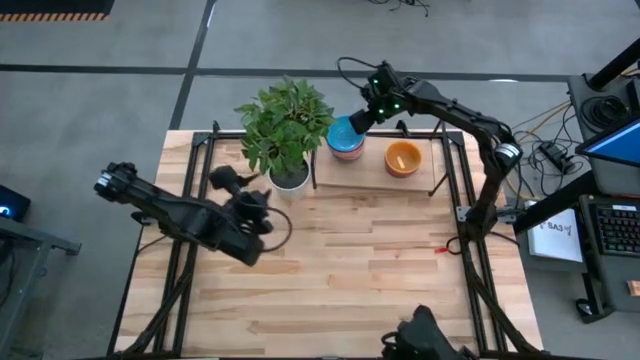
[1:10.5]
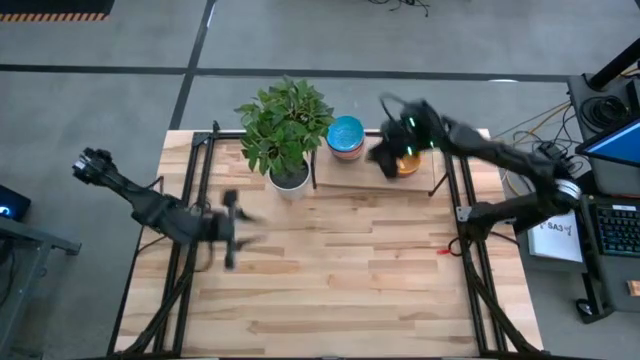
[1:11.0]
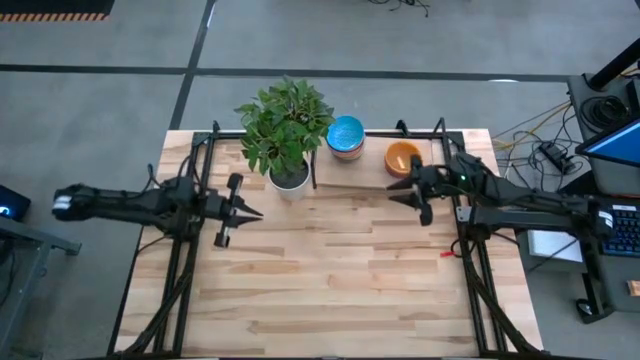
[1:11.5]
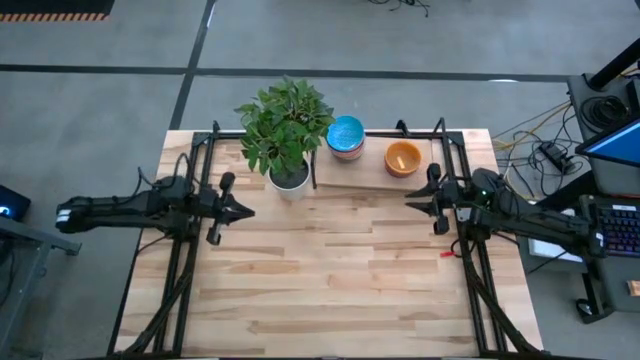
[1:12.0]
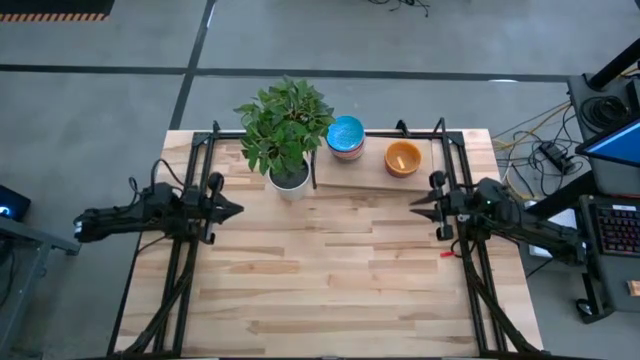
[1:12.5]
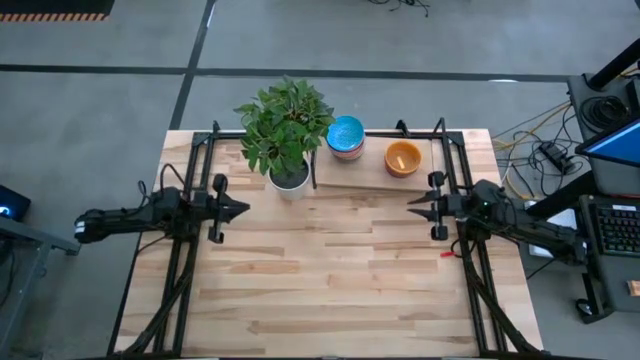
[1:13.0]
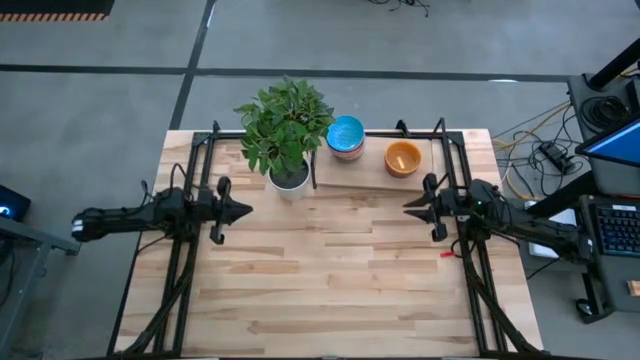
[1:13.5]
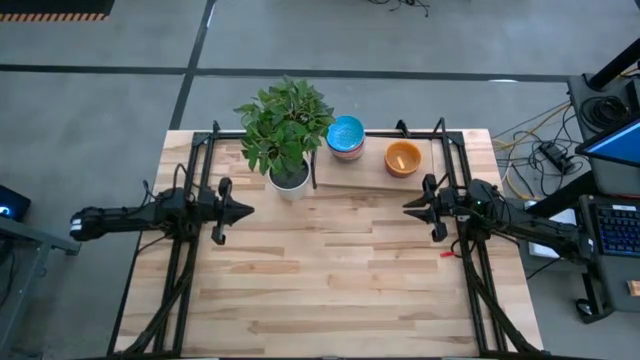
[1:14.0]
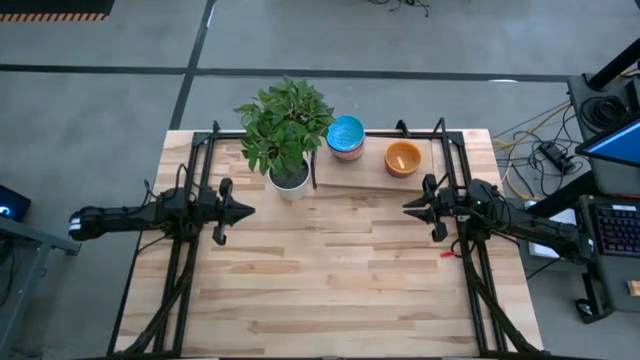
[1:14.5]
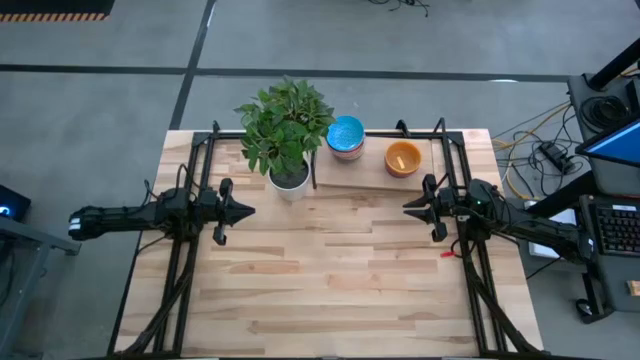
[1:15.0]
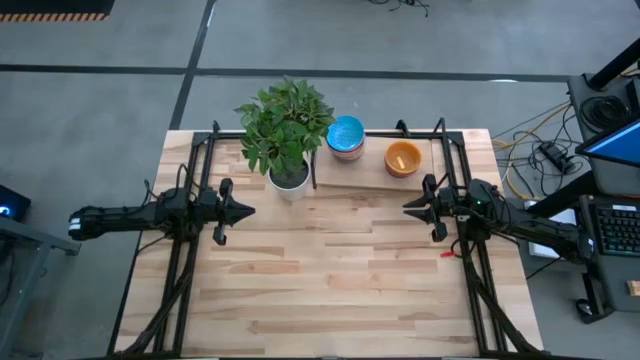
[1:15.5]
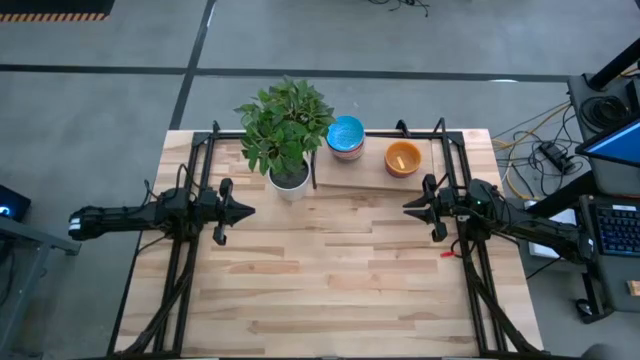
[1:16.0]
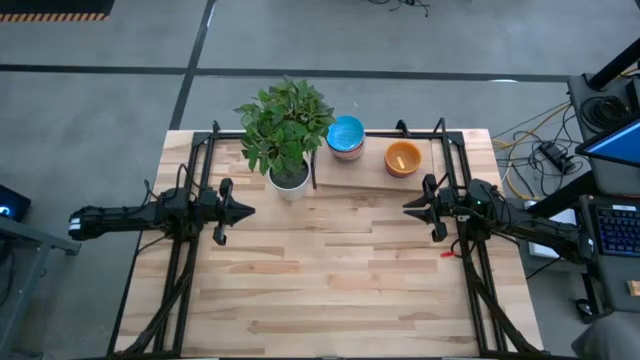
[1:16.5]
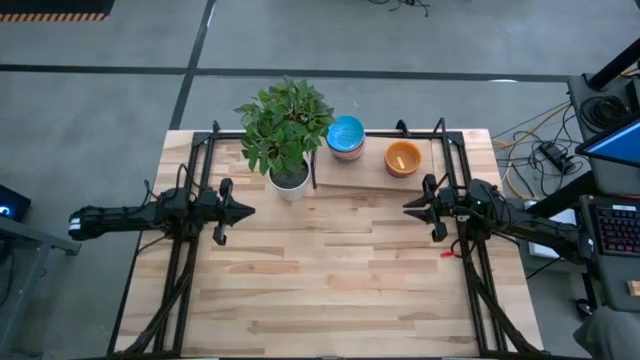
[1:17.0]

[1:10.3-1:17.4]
Task: Place and stack bowls onto a shelf
Return to Home Position

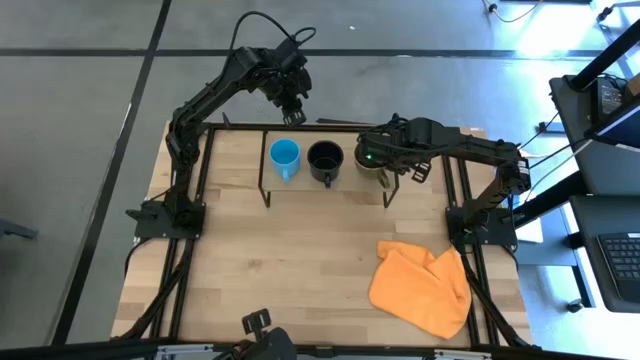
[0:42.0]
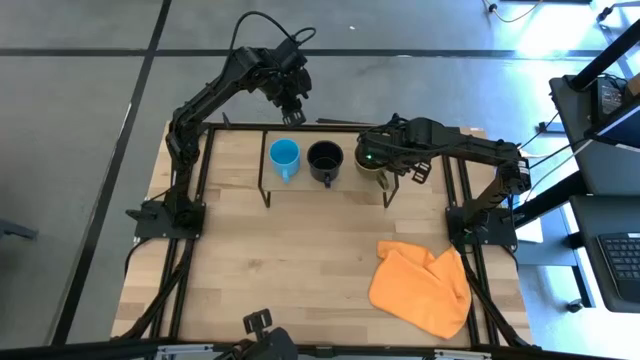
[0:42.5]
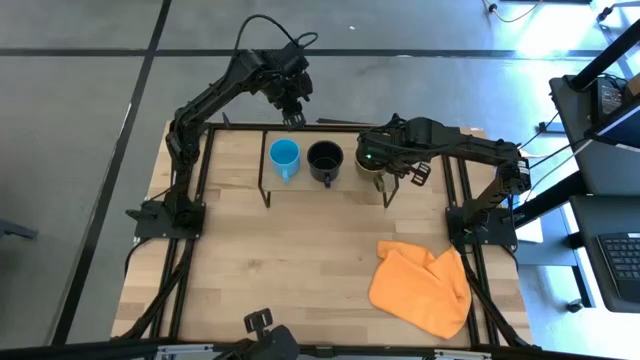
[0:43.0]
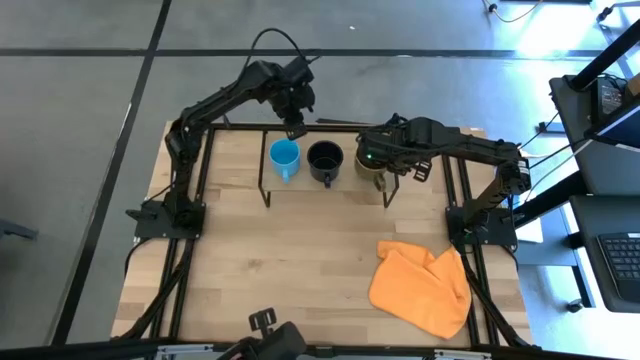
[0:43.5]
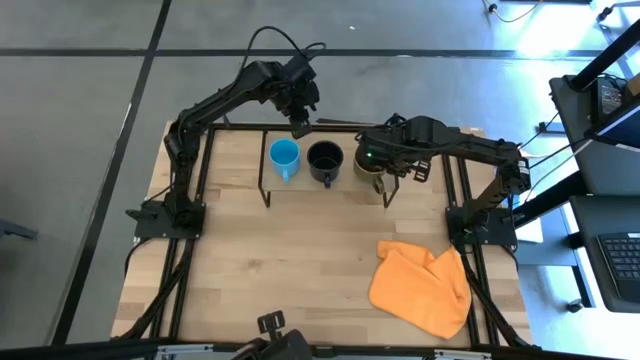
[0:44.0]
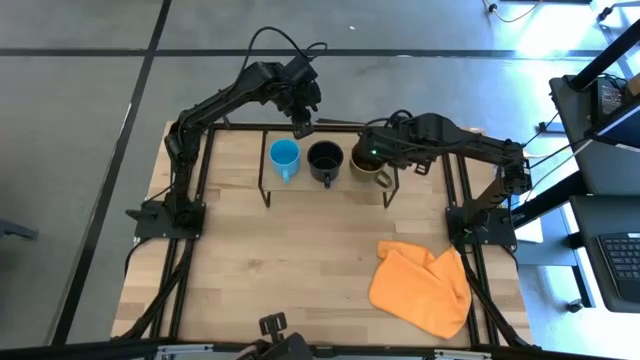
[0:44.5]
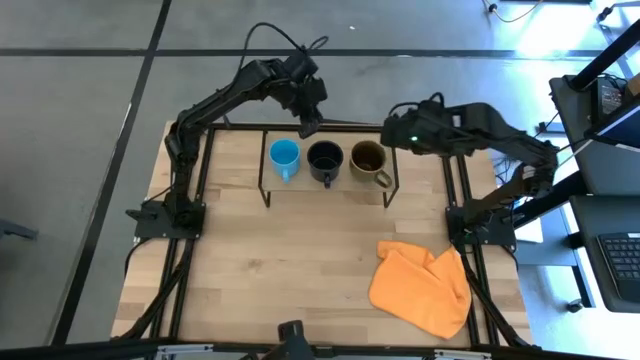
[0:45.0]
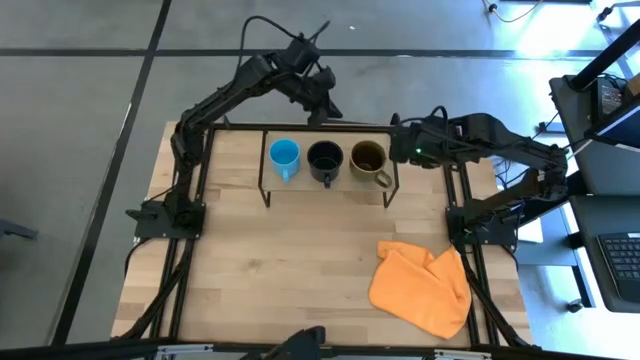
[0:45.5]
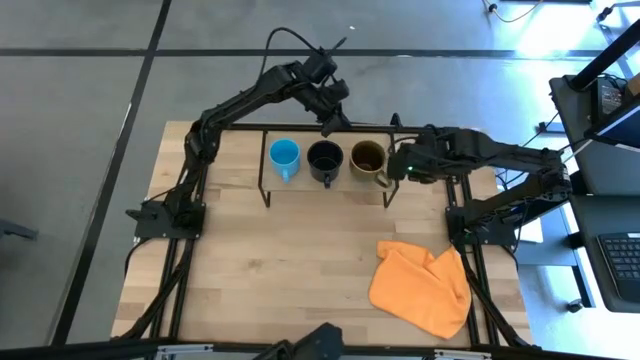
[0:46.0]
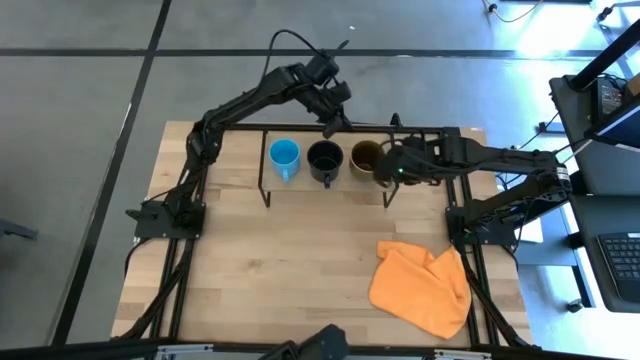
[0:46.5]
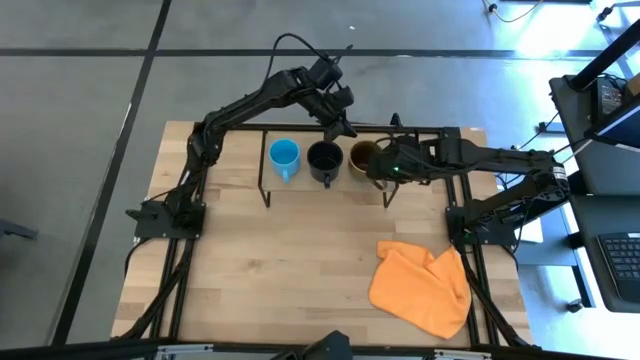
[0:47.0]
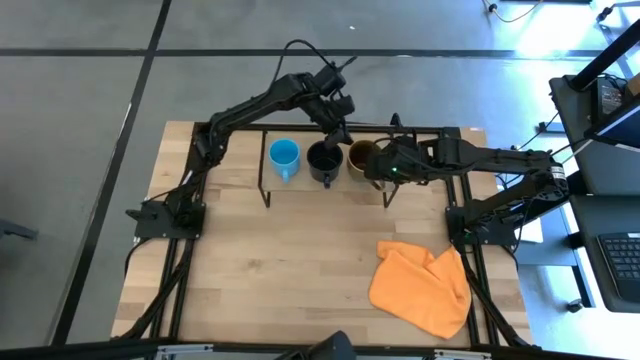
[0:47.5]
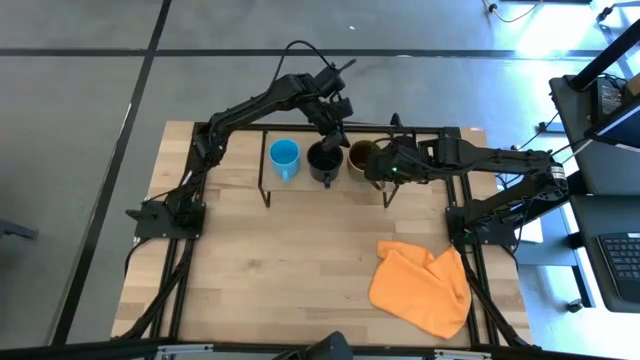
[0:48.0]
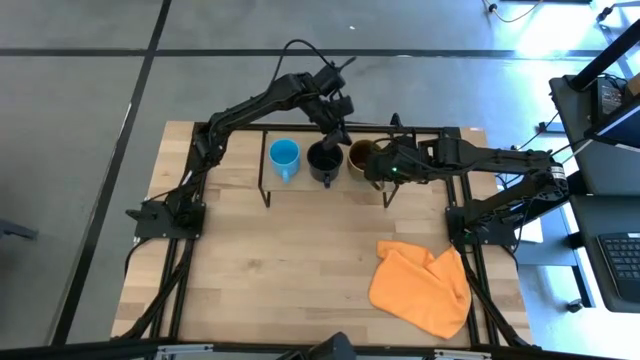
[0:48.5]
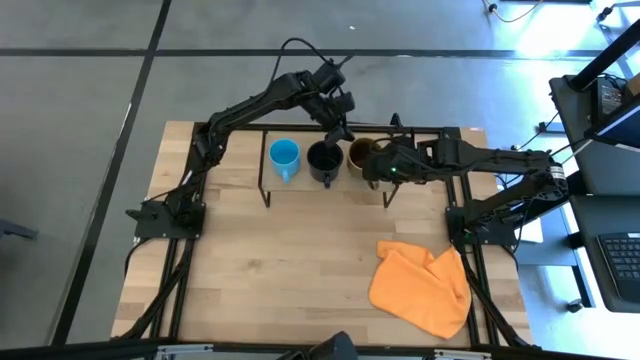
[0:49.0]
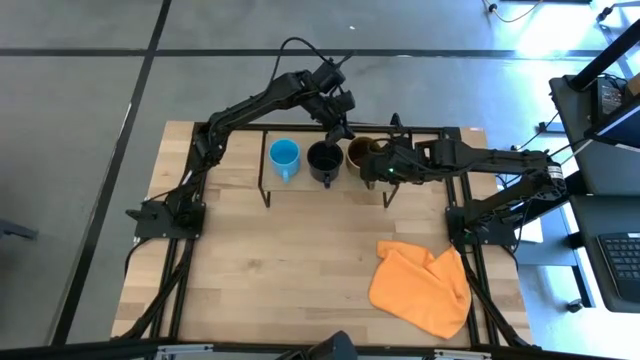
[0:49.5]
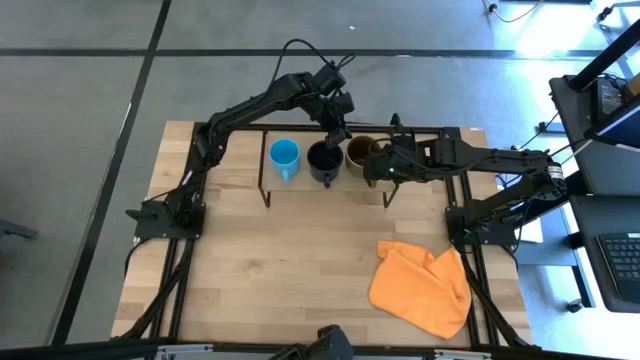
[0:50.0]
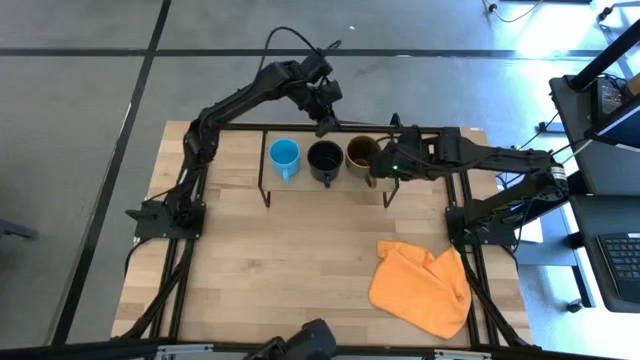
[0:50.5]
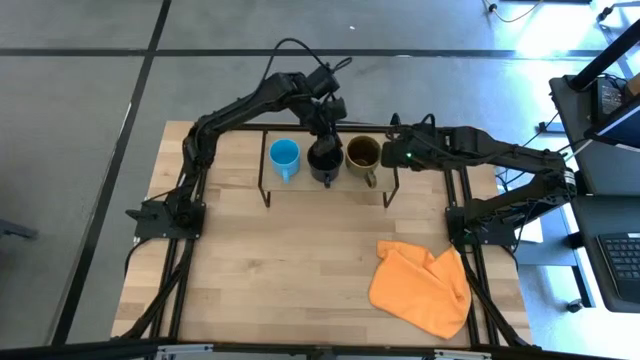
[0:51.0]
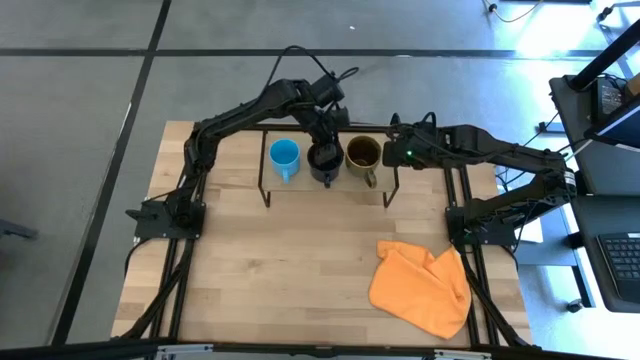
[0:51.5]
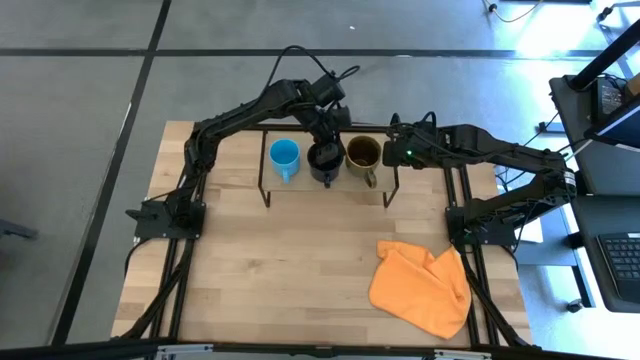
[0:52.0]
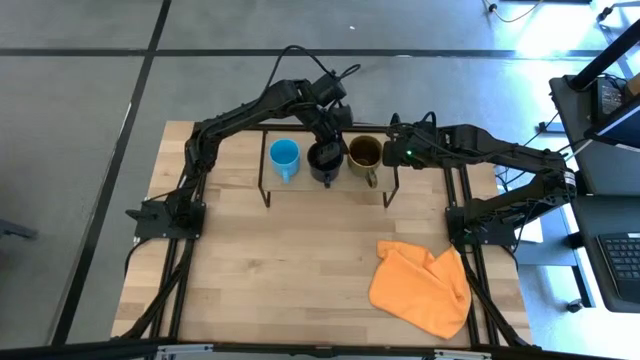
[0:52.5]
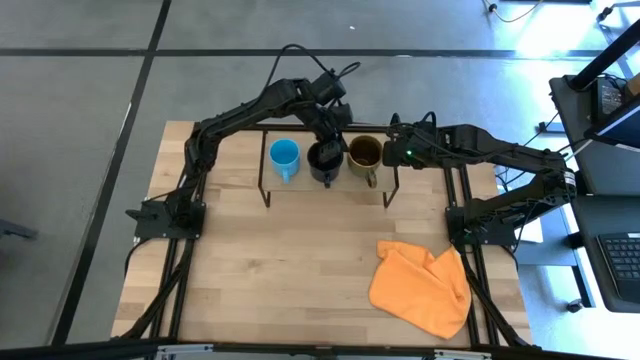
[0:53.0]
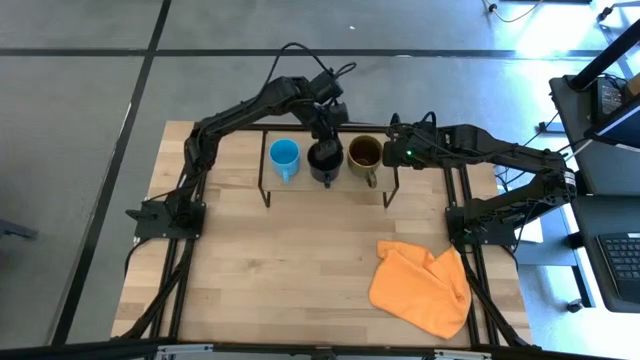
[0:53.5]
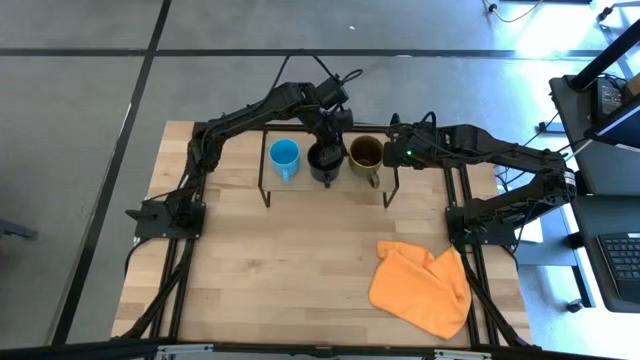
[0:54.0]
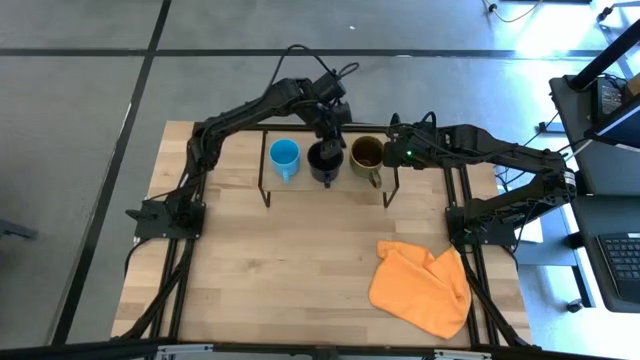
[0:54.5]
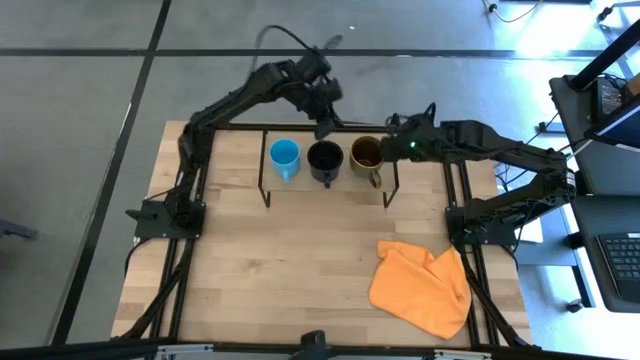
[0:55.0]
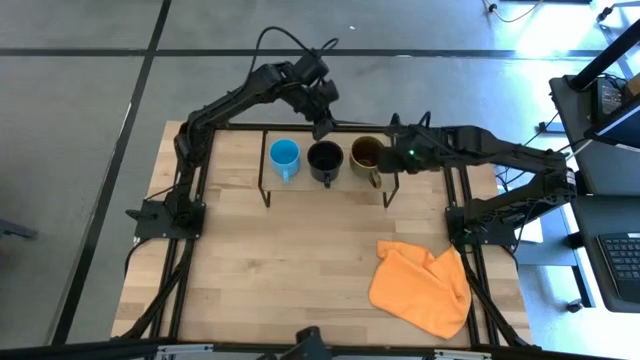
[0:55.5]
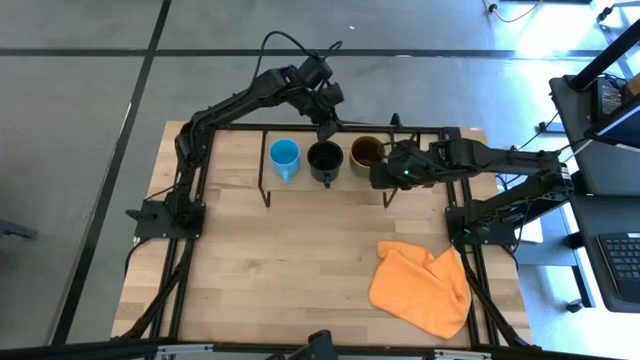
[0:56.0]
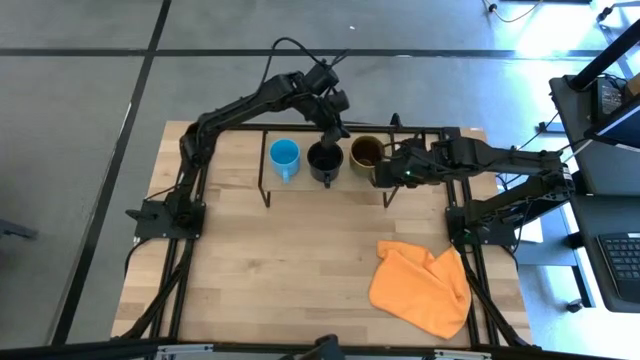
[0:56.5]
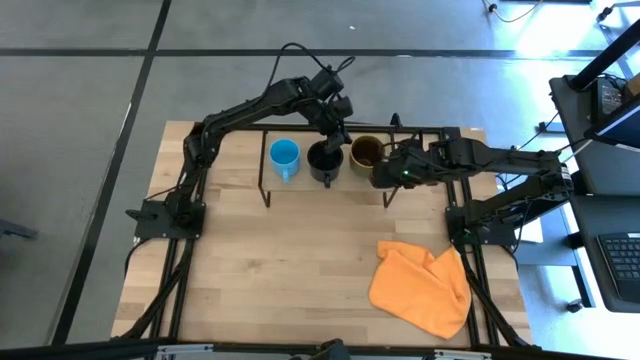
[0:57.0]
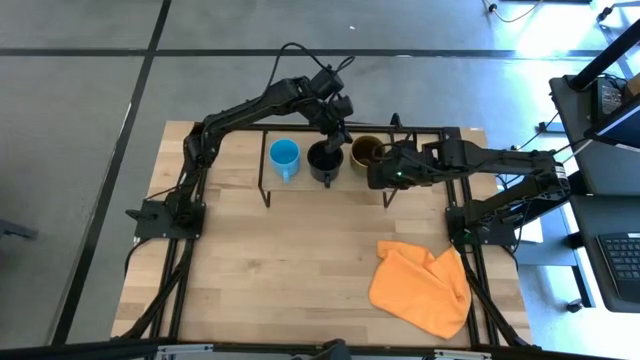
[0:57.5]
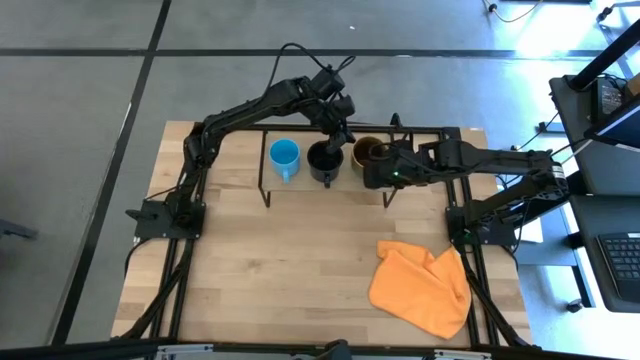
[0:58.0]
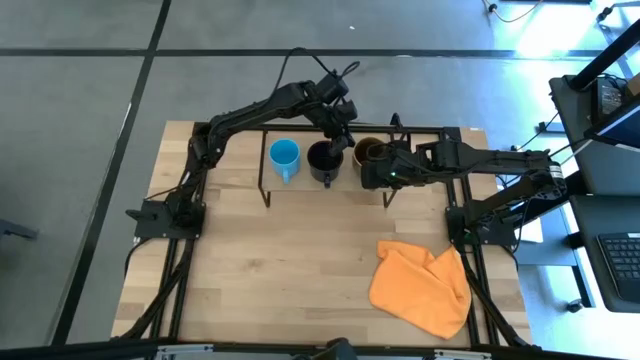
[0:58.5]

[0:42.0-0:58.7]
Task: Stack small to large cups/mugs on shelf
Put the brown mug on the shelf
